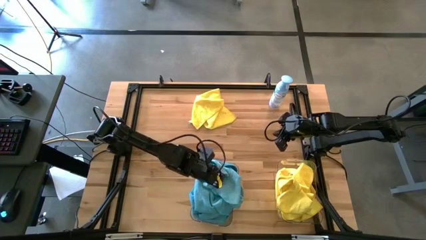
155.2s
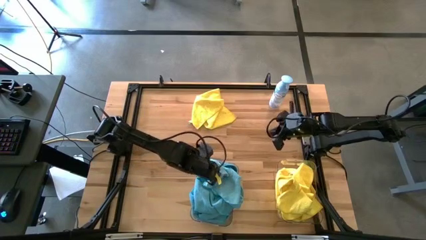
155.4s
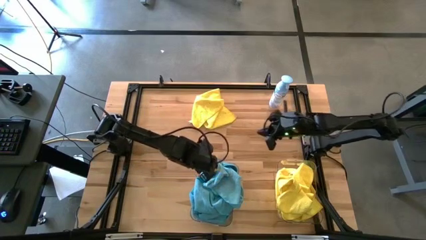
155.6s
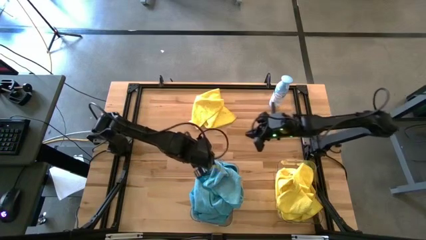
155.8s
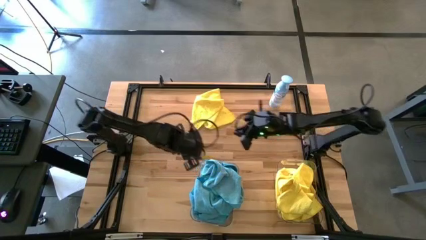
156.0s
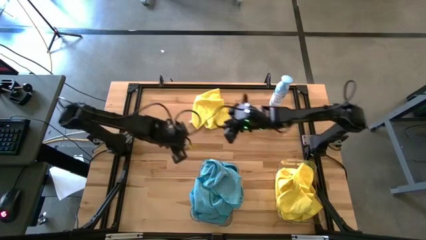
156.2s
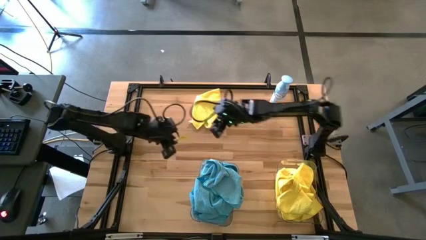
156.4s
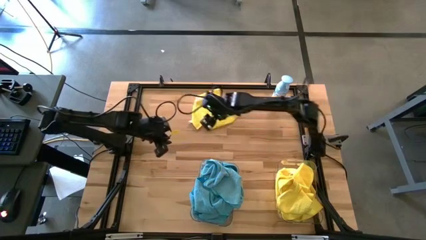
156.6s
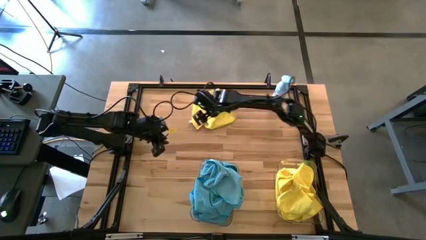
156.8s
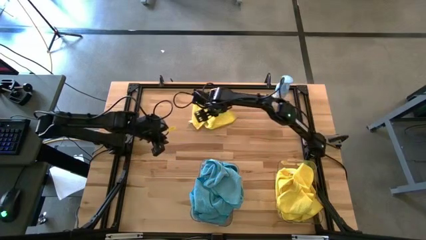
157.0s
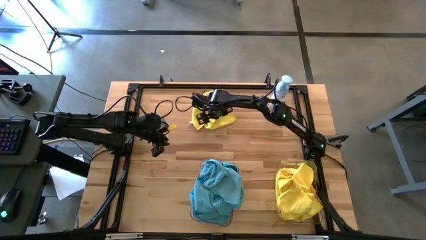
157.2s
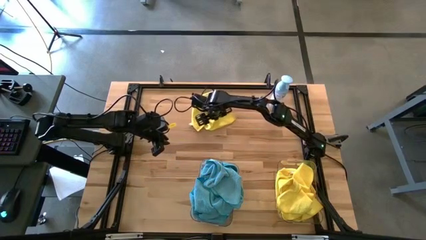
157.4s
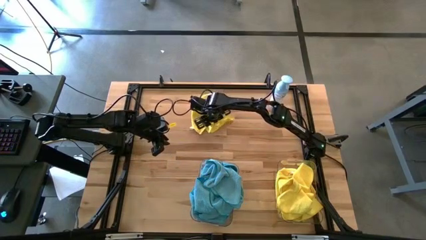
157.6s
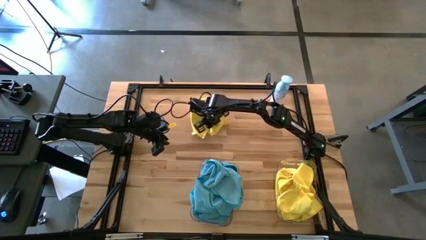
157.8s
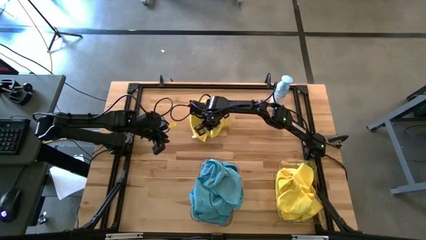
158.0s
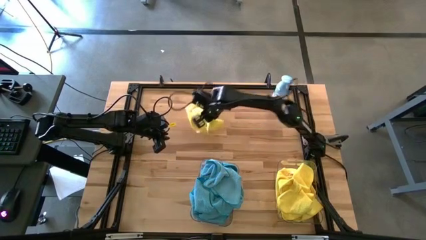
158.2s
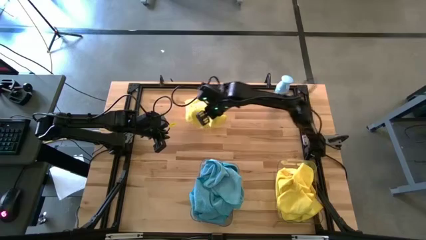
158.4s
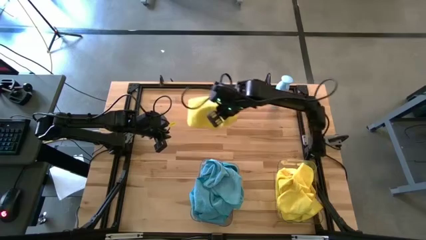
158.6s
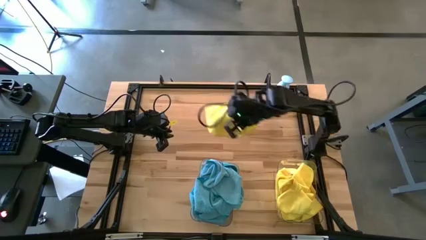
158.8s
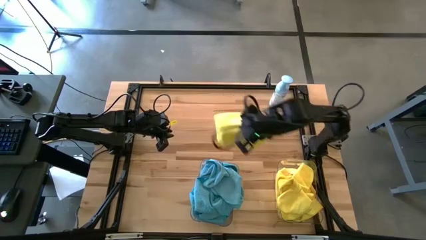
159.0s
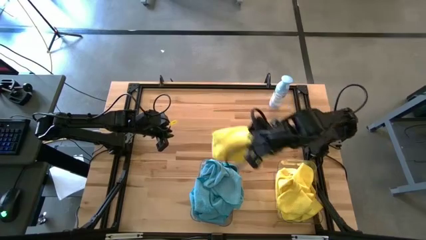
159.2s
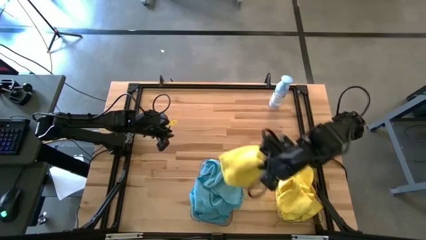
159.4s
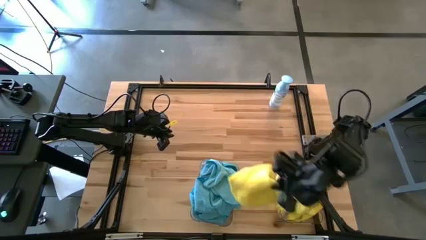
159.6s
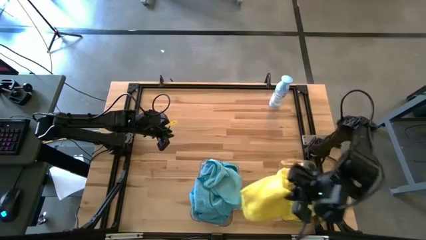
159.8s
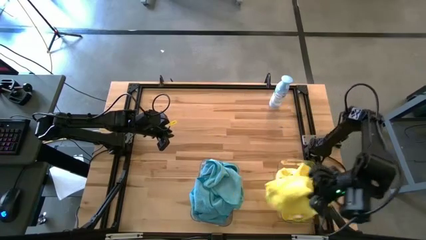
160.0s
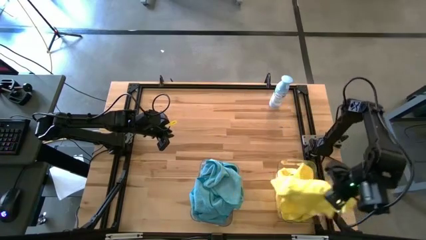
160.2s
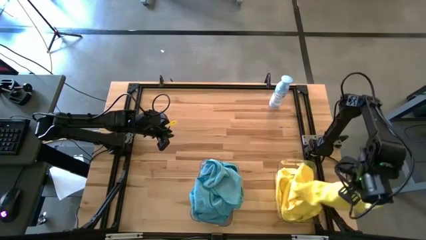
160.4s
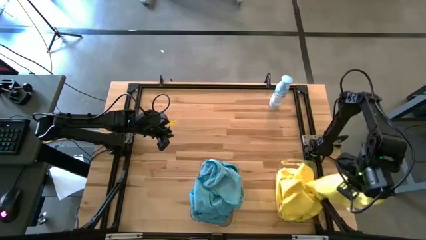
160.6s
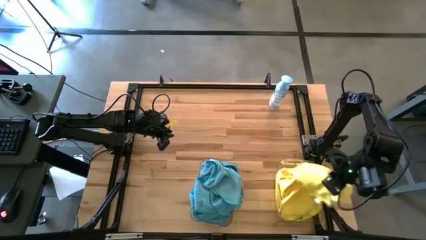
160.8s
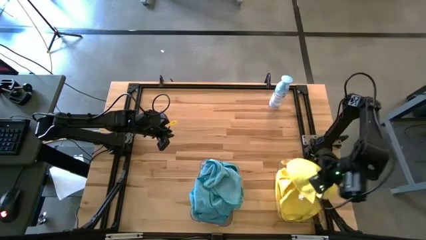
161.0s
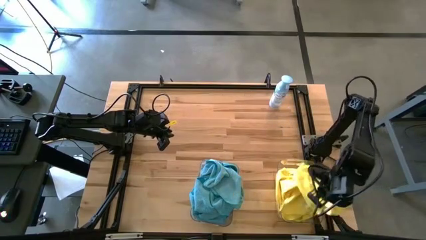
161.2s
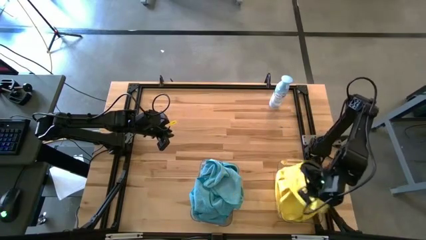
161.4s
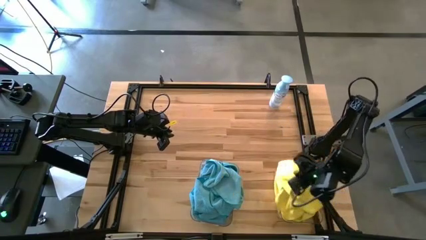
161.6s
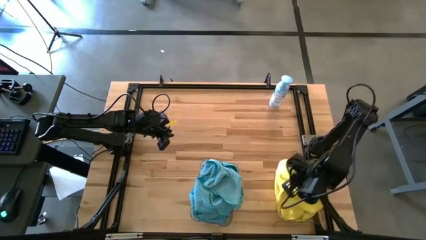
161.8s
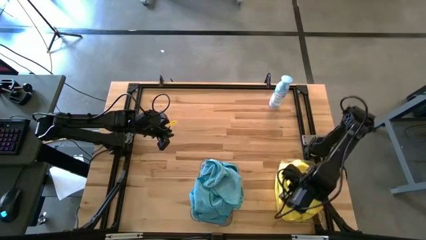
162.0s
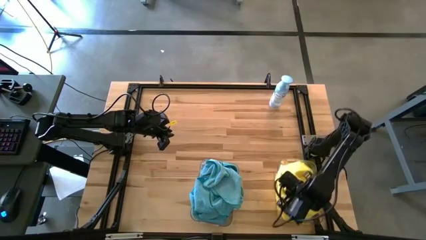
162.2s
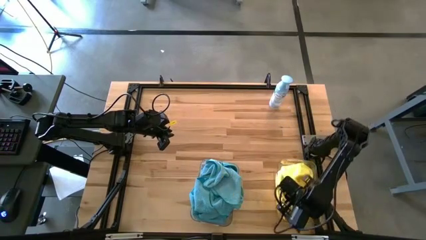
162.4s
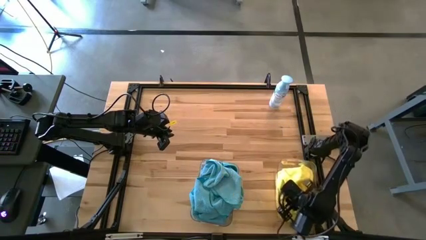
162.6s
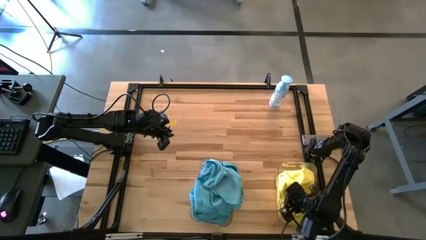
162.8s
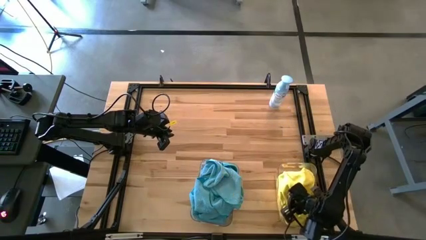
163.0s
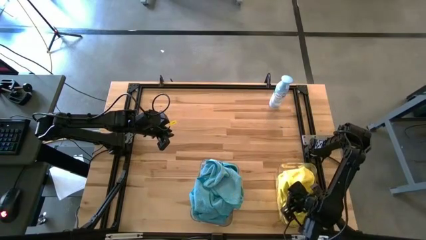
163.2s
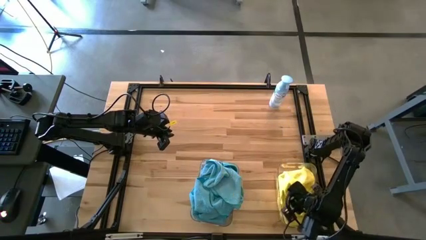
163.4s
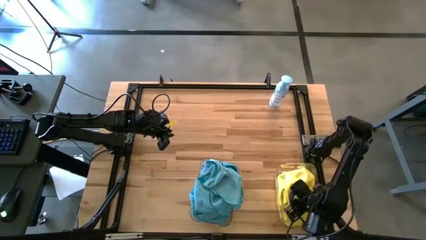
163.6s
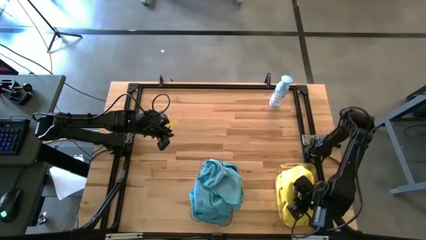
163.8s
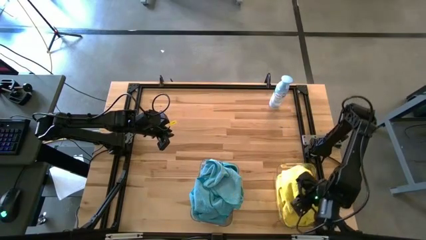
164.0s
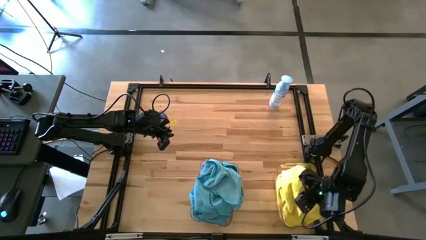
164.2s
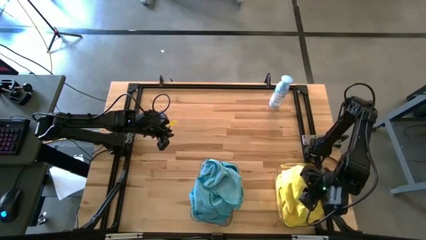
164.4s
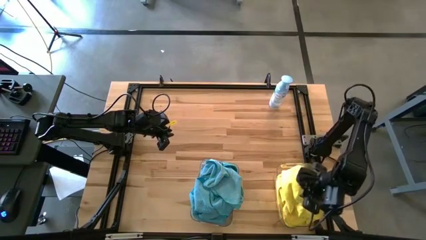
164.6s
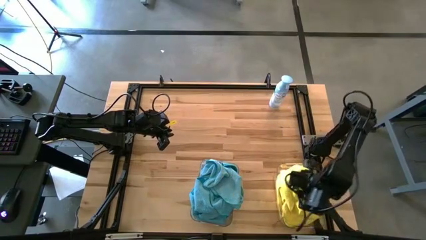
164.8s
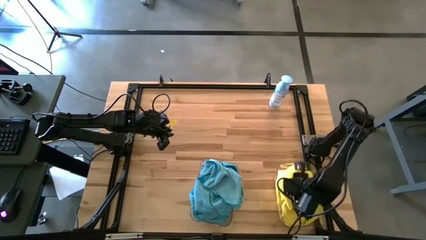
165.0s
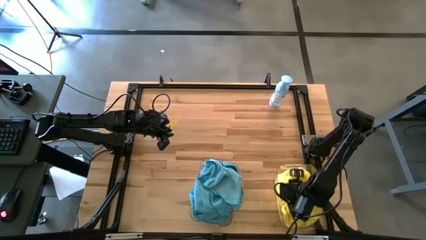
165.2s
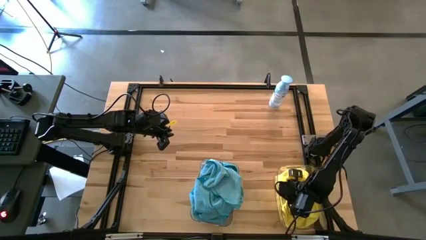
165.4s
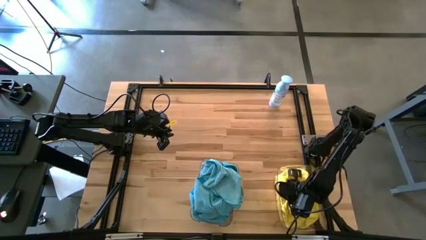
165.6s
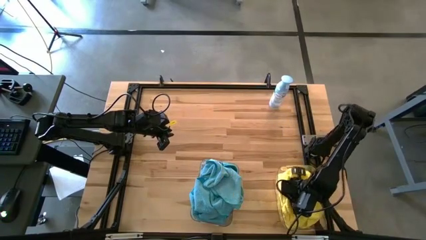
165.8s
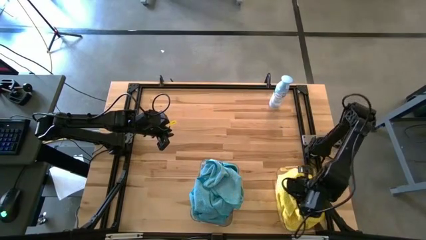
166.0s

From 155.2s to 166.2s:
Task: Sort microfiber towel by color & place in baskets
Put the yellow towel into the right transparent bin
